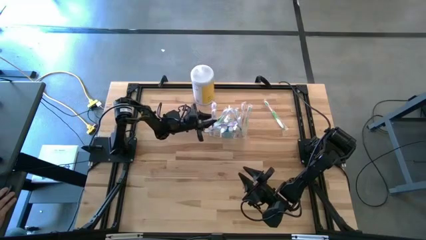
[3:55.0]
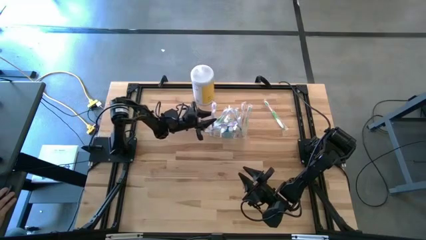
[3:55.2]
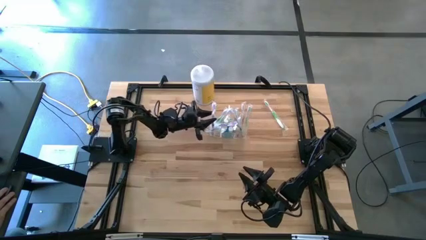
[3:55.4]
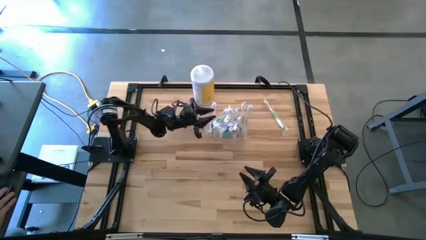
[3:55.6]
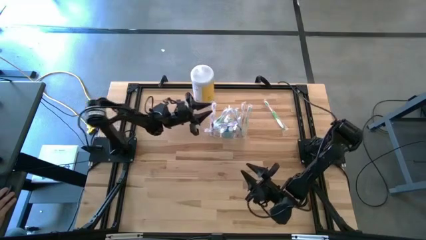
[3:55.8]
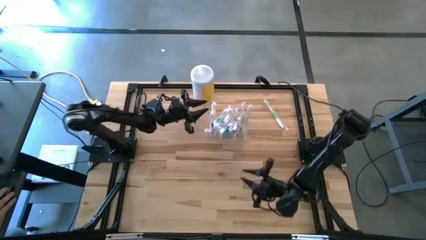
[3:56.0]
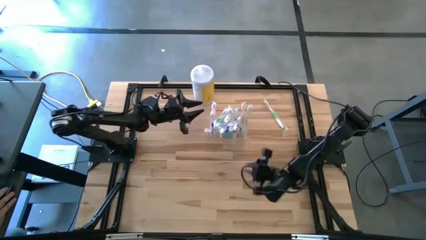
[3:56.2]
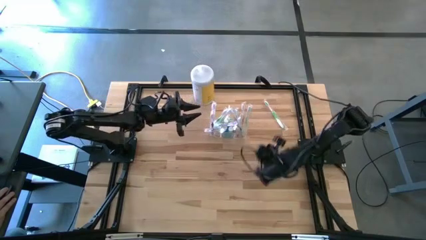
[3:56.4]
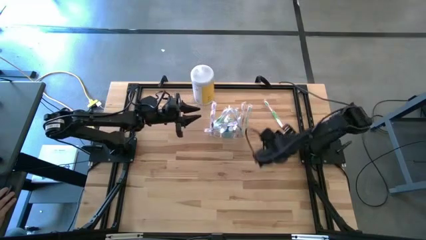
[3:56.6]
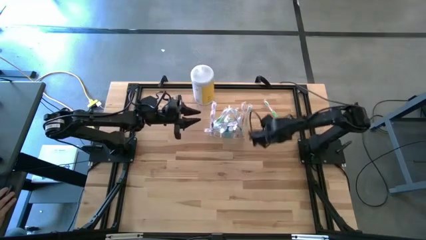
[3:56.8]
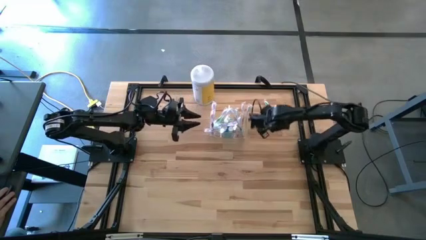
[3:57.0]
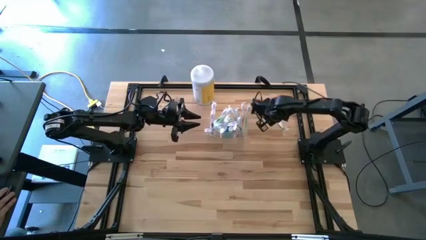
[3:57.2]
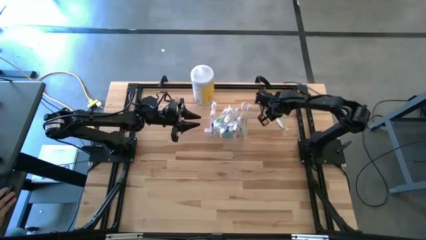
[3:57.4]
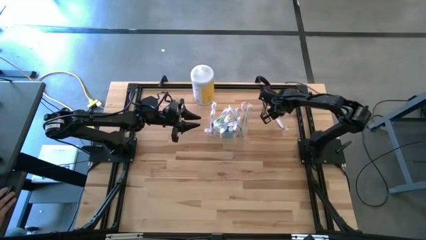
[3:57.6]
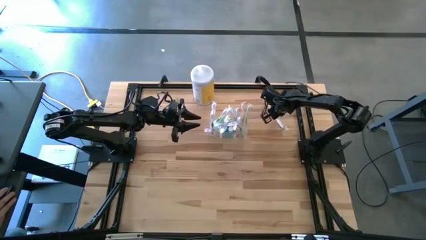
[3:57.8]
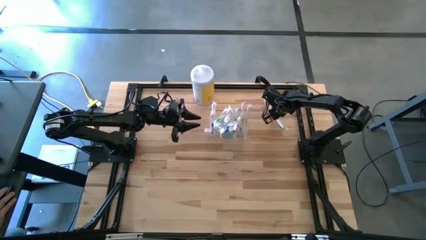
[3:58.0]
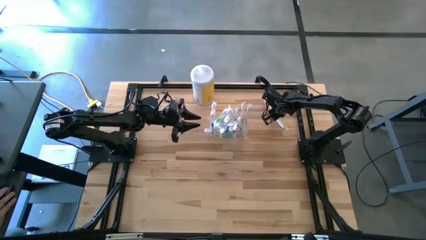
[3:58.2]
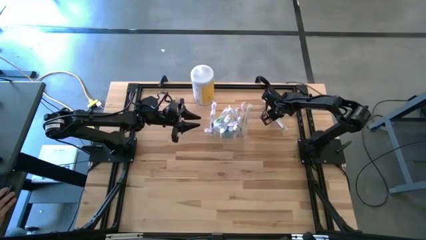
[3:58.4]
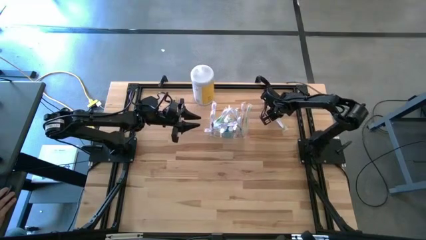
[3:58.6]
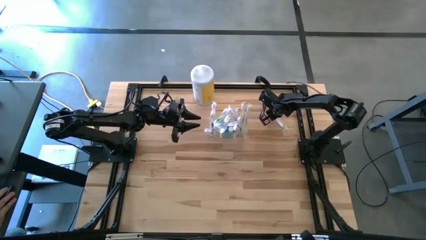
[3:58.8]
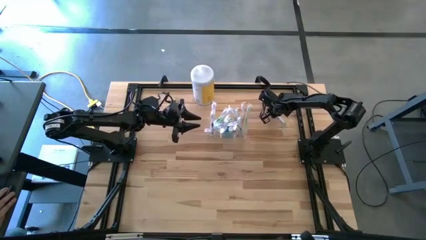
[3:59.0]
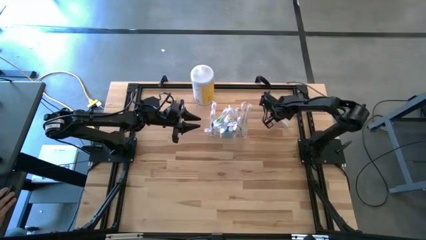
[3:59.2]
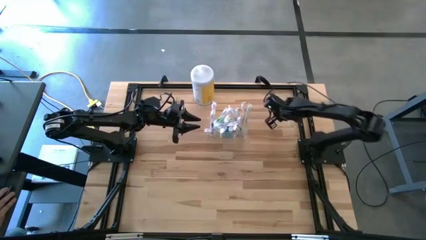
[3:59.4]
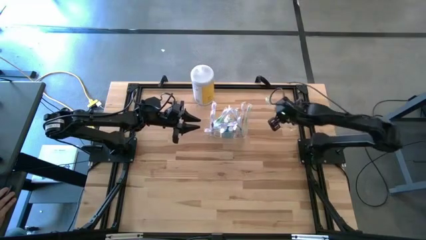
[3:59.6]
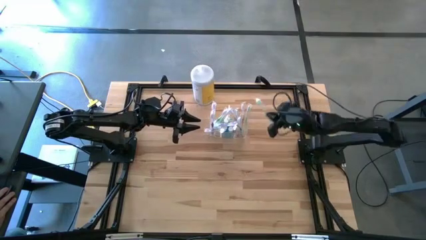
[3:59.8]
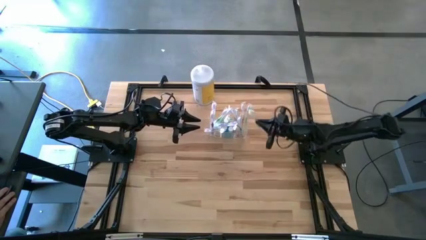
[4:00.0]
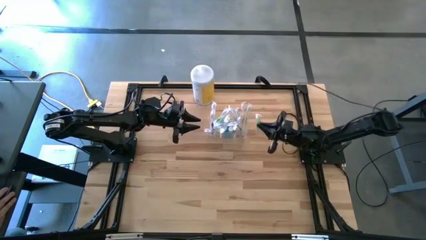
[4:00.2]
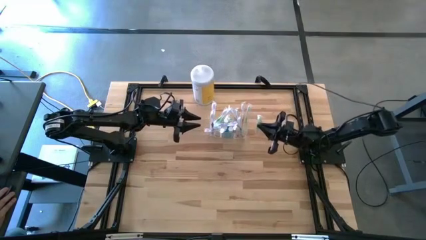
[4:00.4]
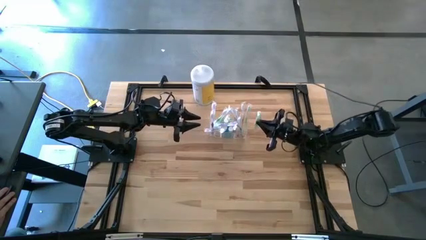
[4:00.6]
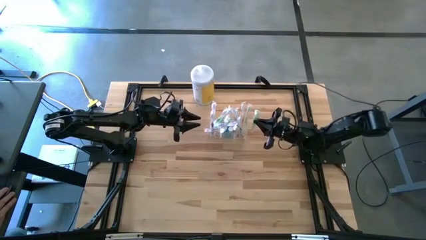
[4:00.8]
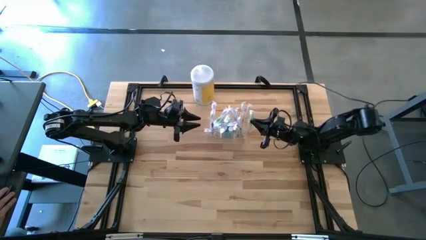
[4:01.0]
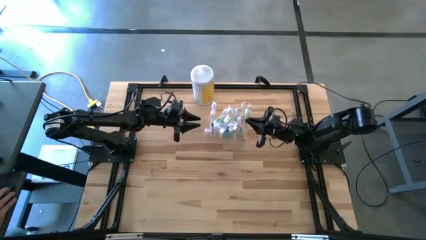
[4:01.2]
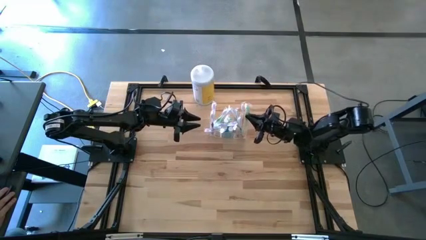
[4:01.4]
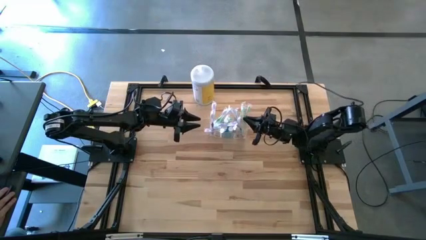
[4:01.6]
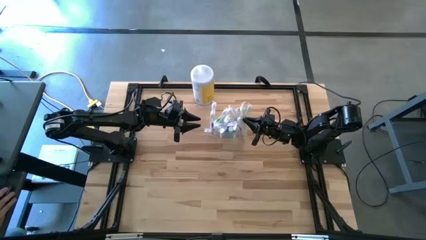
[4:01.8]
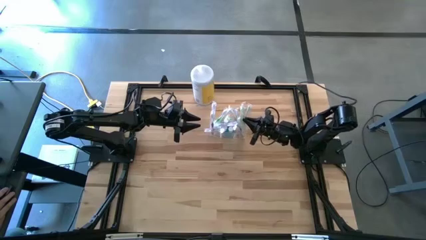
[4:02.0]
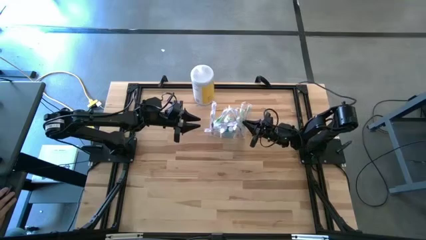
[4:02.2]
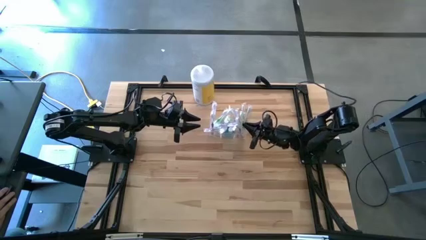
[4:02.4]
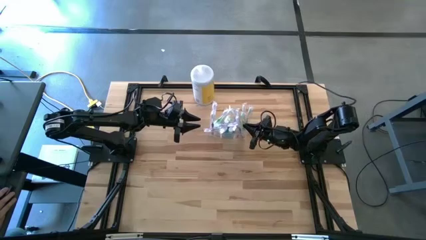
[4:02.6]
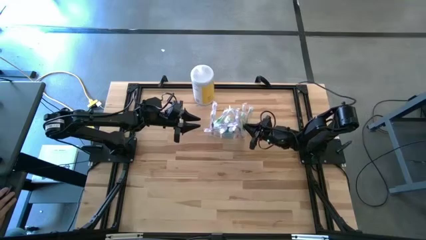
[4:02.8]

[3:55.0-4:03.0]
Task: Pick & Place toothbrushing station
Put the green toothbrush into the transparent organizer

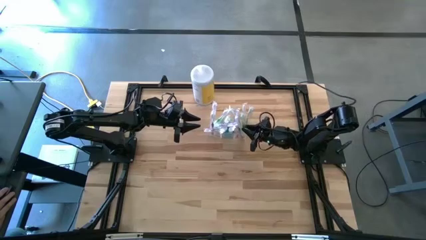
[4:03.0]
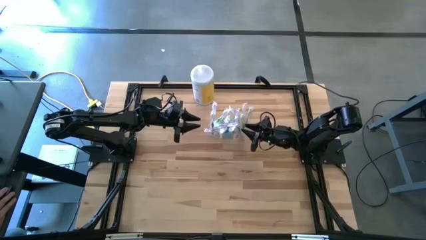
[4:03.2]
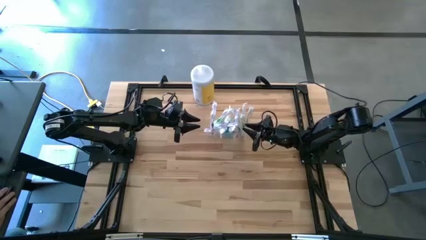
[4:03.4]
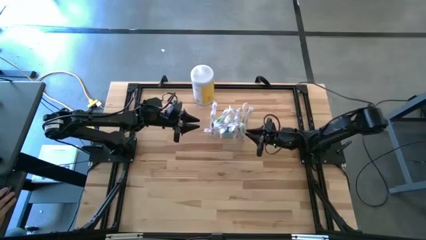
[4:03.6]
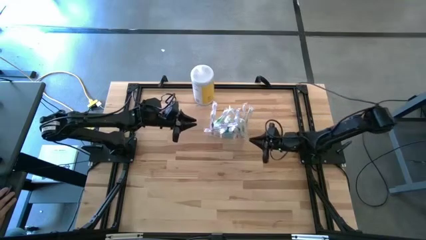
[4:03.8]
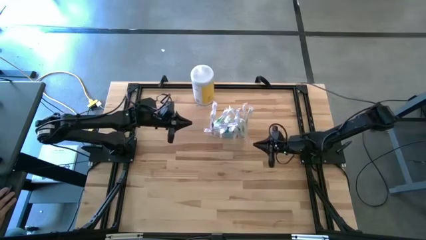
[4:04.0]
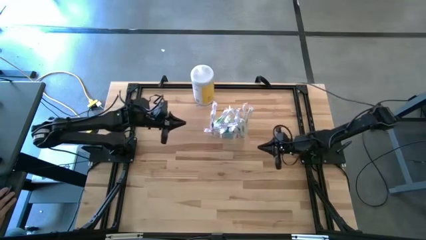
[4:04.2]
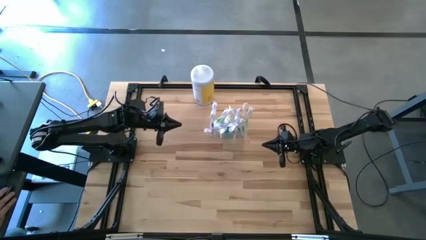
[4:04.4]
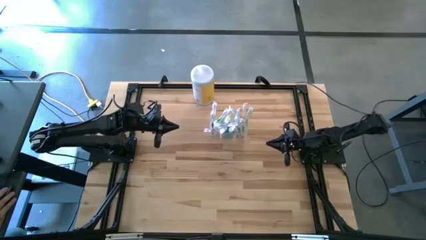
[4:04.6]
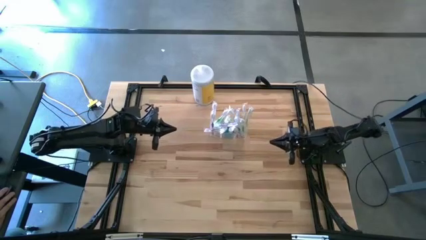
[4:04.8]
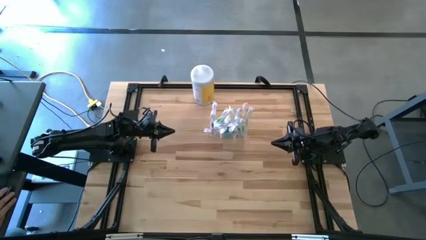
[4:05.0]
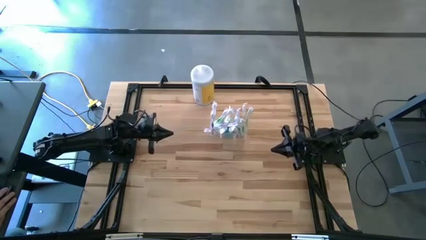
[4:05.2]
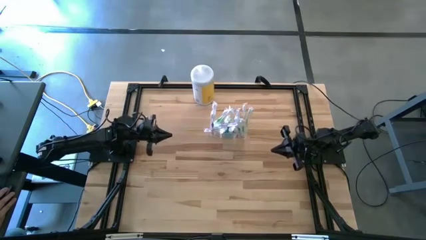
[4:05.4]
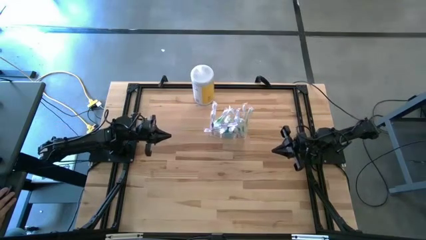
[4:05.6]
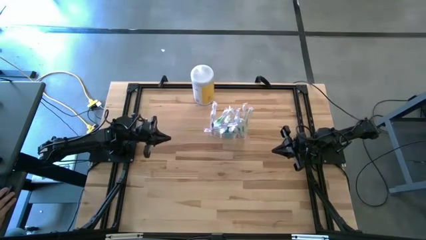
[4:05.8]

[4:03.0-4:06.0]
Return to Home Position

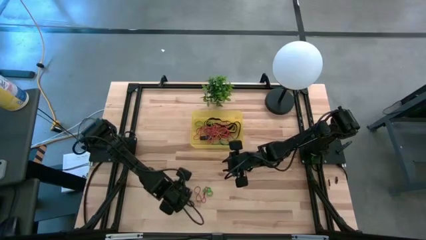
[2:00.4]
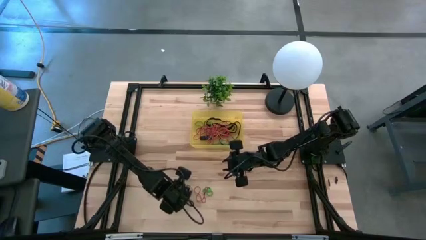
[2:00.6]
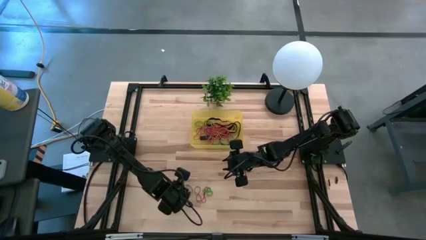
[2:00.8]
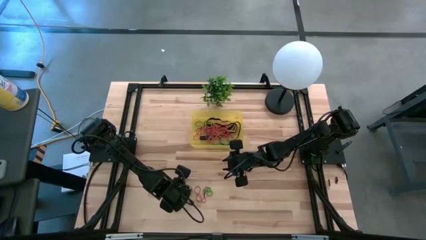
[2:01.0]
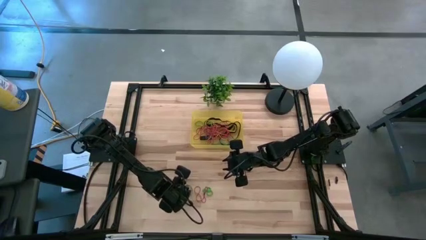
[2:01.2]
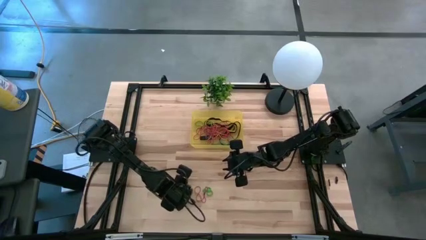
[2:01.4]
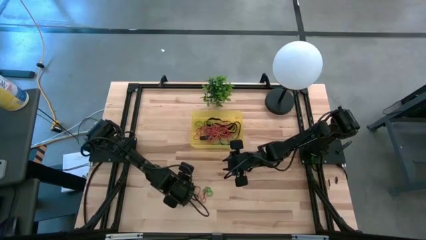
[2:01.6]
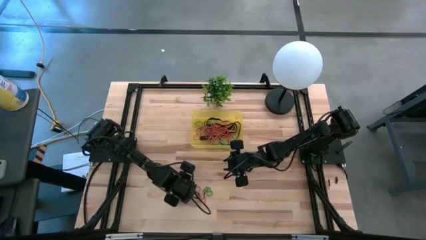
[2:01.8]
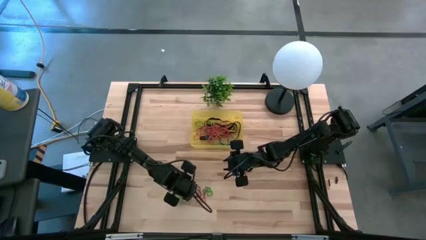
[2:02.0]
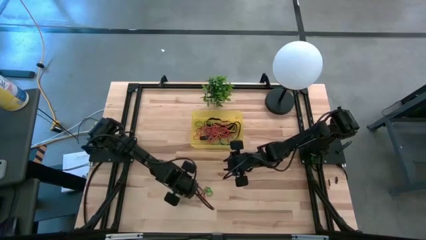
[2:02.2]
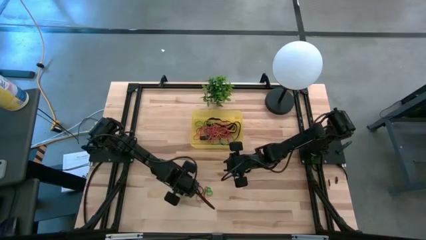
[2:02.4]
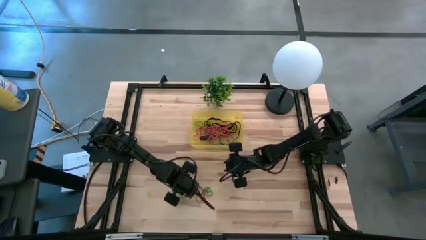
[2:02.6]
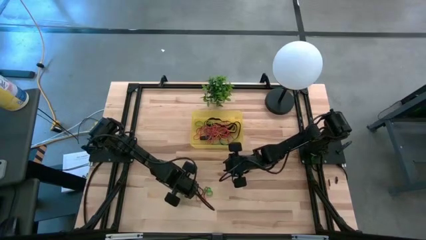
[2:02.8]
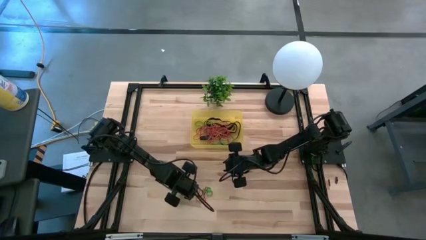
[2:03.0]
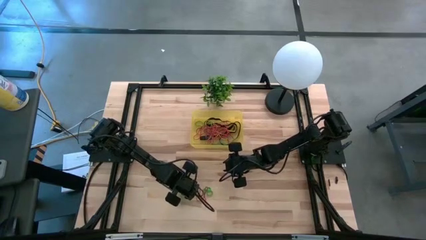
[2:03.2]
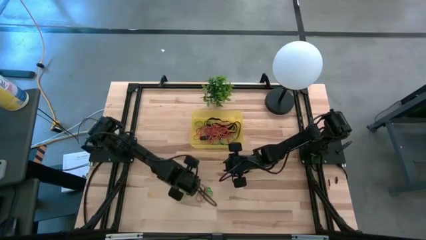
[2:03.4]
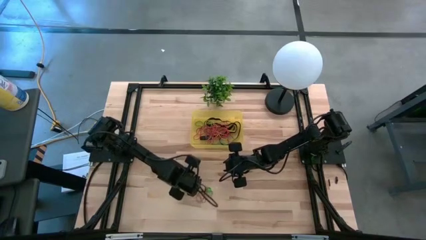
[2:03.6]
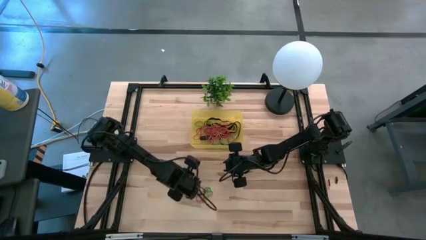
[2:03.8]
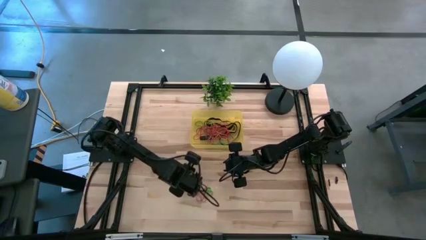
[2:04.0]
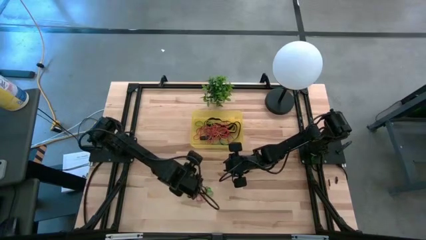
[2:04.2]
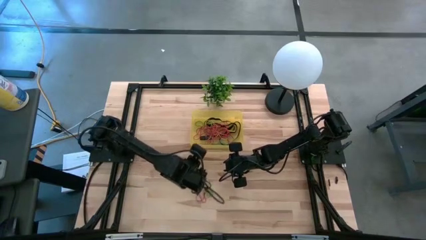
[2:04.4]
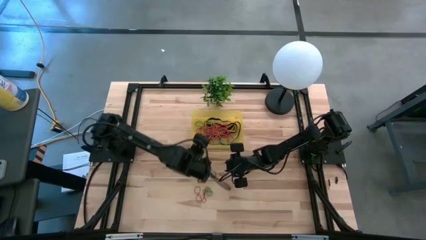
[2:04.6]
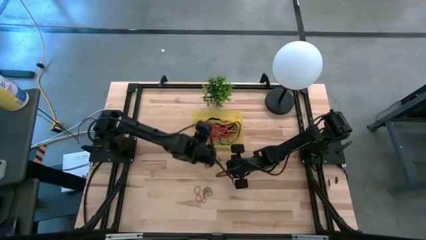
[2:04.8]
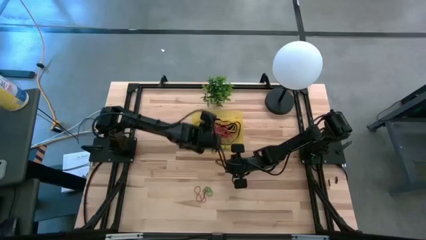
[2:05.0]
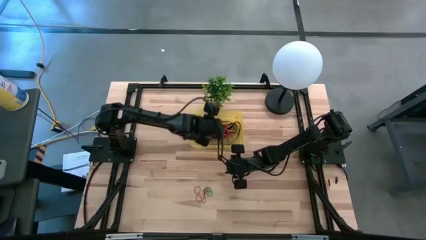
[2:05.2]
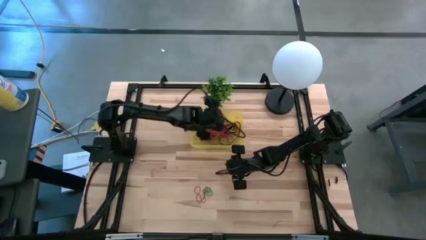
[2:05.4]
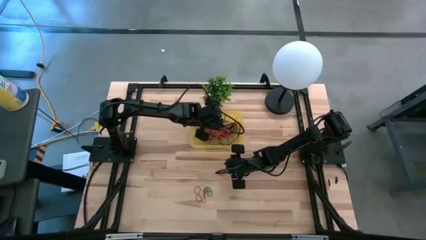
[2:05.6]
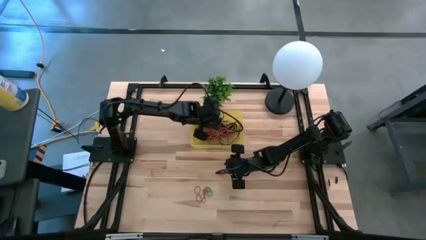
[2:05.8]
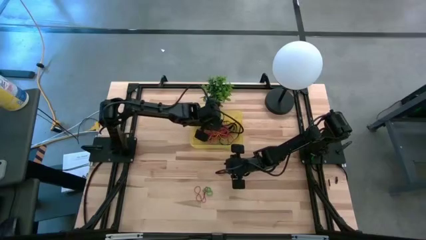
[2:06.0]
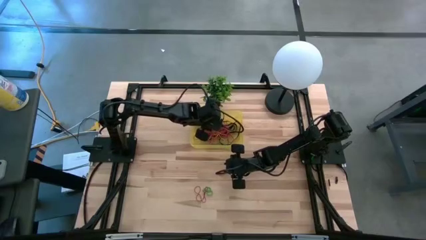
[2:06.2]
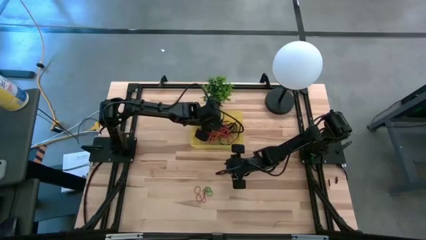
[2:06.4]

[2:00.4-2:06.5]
Task: Pick and place rubber bands into bin
Put the green rubber band into the yellow bin
